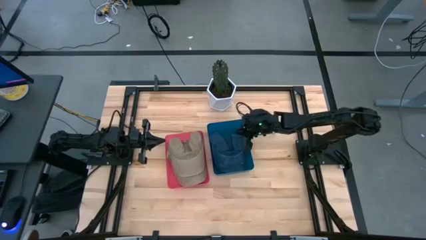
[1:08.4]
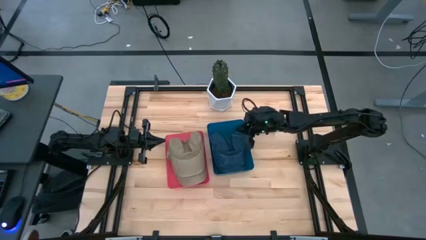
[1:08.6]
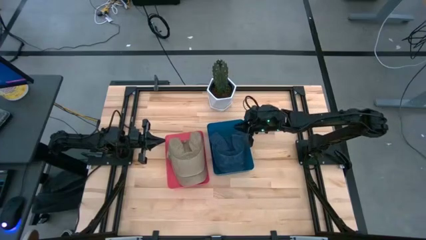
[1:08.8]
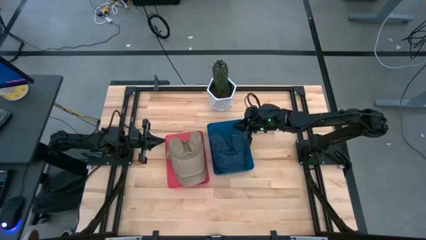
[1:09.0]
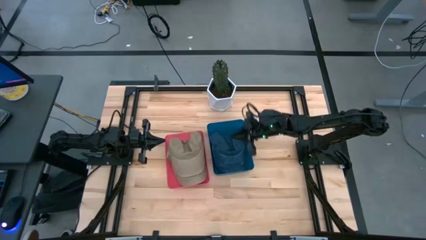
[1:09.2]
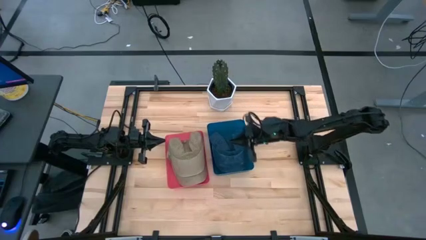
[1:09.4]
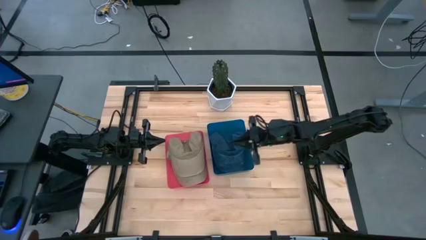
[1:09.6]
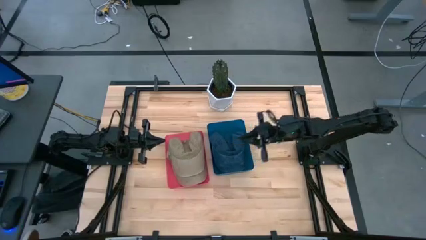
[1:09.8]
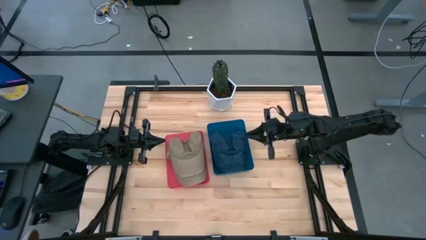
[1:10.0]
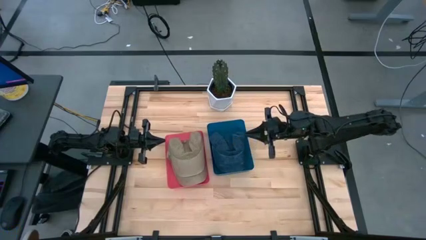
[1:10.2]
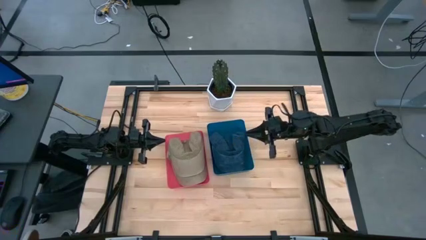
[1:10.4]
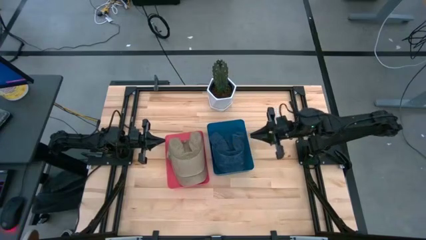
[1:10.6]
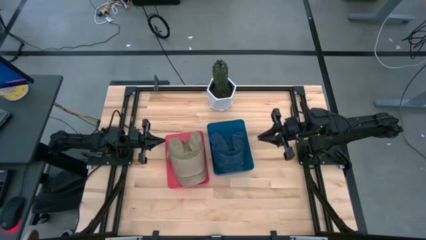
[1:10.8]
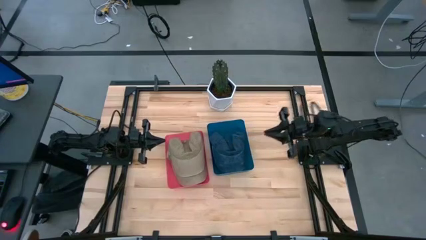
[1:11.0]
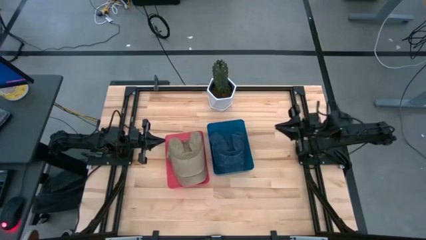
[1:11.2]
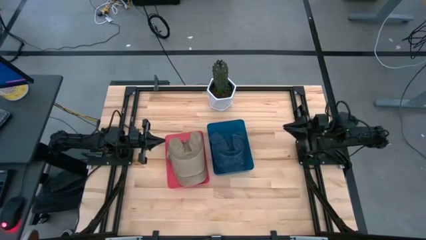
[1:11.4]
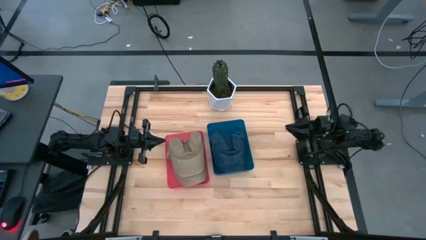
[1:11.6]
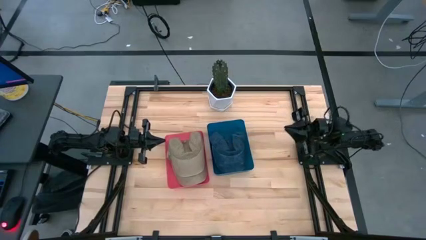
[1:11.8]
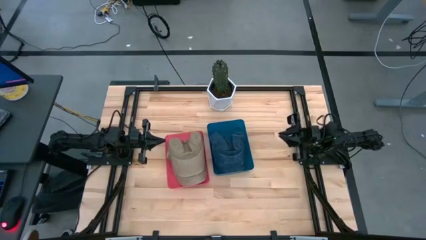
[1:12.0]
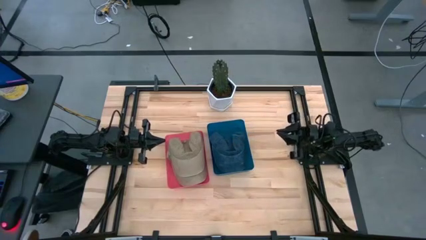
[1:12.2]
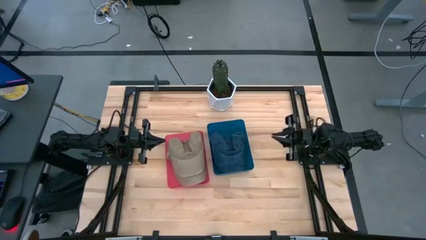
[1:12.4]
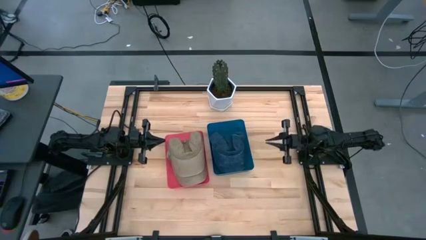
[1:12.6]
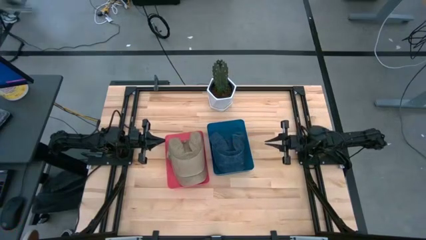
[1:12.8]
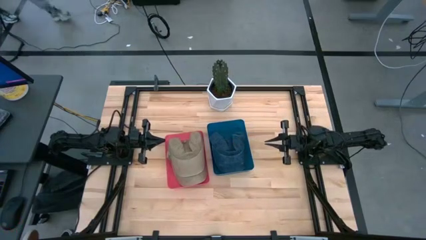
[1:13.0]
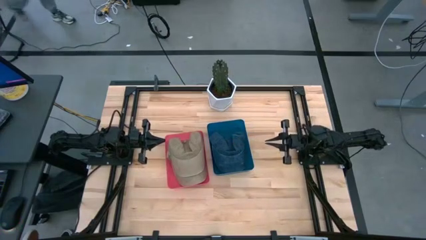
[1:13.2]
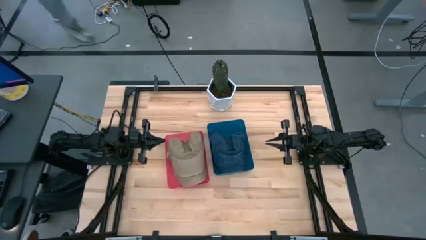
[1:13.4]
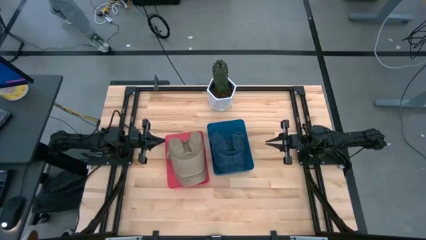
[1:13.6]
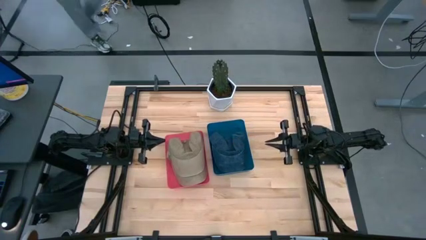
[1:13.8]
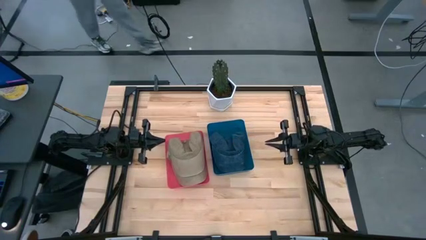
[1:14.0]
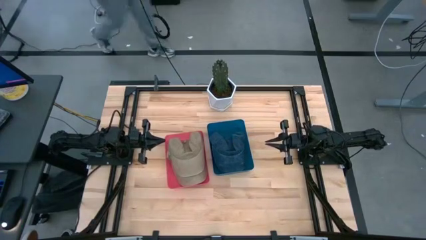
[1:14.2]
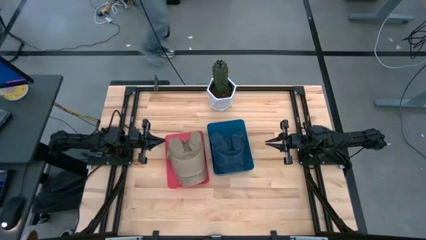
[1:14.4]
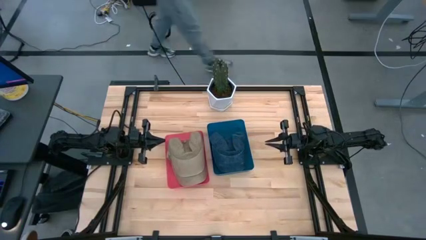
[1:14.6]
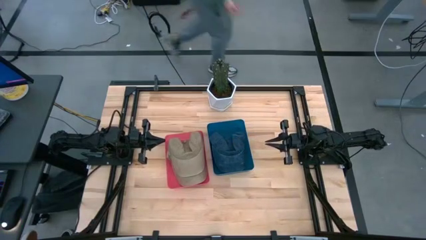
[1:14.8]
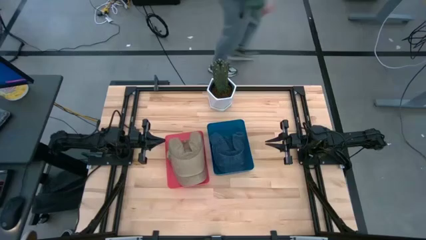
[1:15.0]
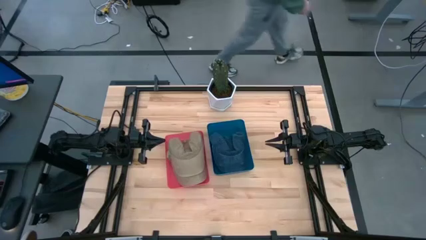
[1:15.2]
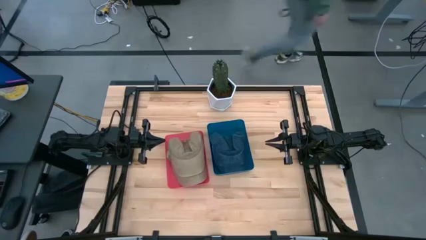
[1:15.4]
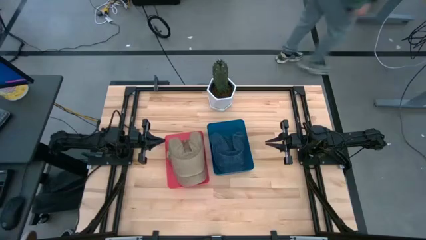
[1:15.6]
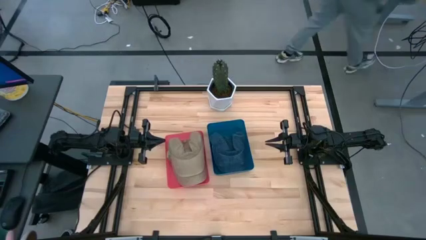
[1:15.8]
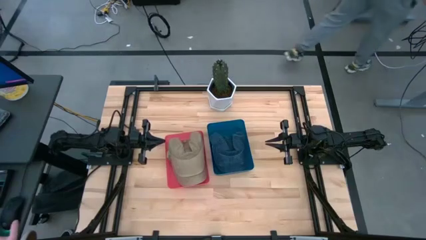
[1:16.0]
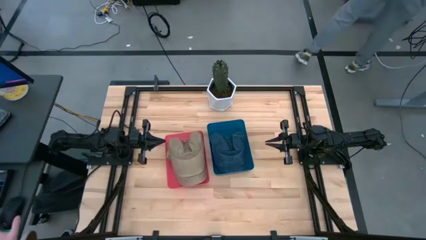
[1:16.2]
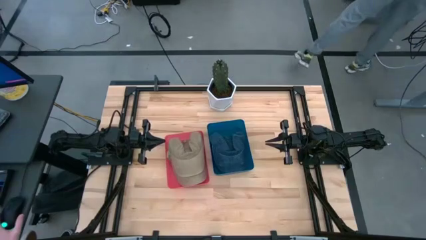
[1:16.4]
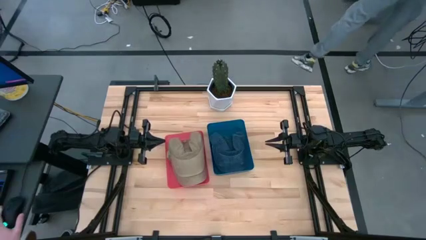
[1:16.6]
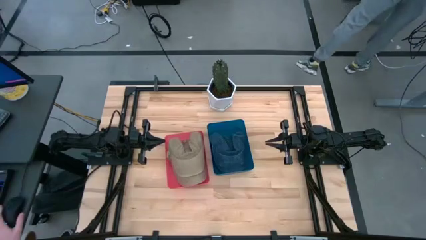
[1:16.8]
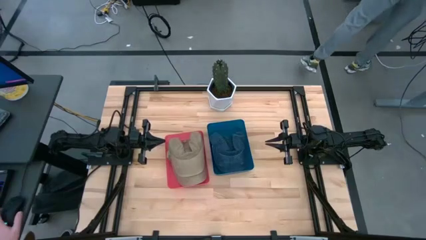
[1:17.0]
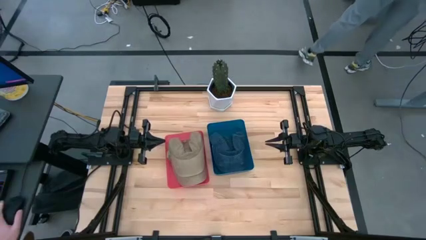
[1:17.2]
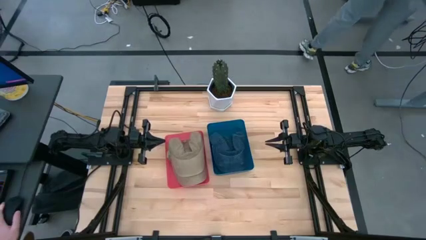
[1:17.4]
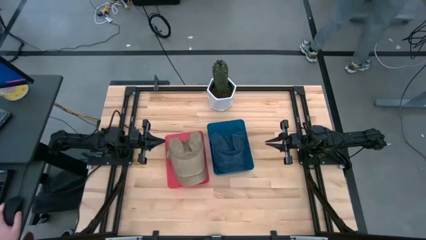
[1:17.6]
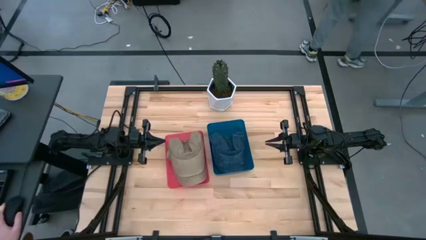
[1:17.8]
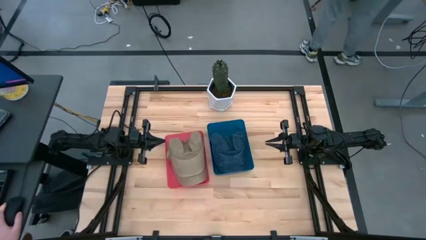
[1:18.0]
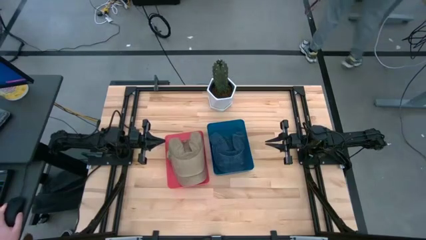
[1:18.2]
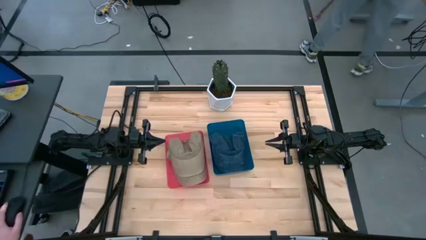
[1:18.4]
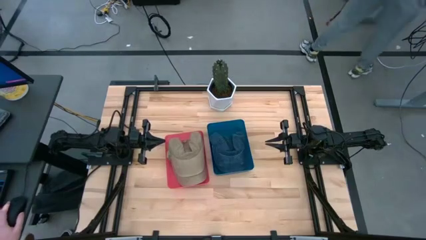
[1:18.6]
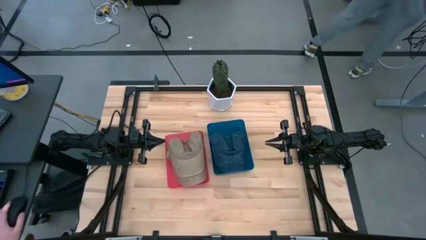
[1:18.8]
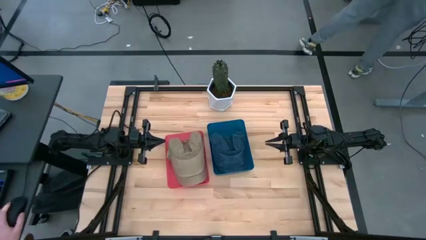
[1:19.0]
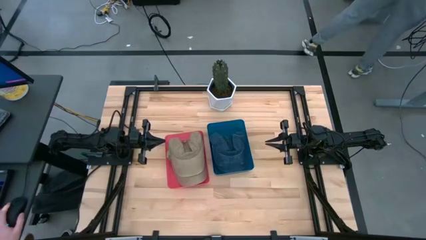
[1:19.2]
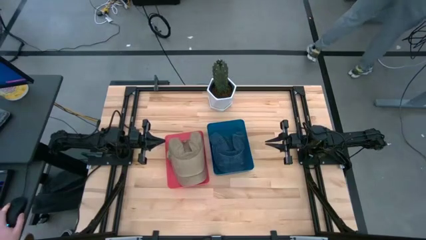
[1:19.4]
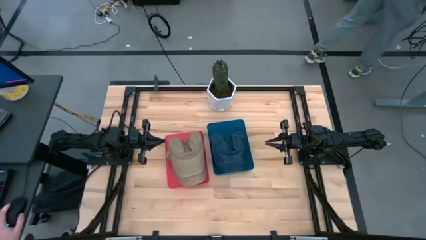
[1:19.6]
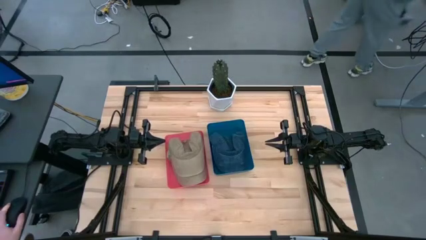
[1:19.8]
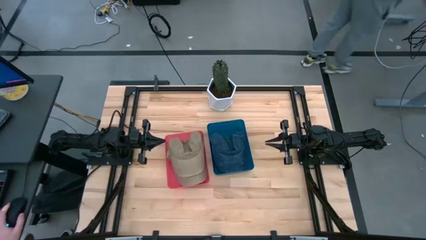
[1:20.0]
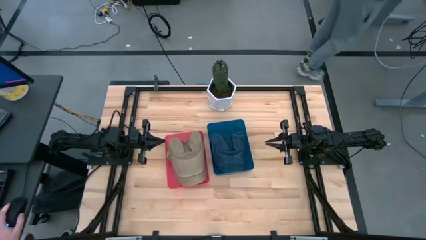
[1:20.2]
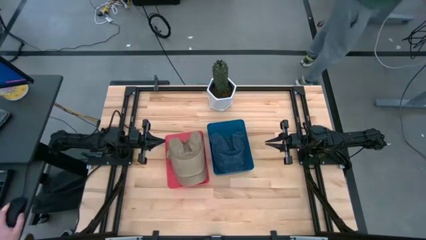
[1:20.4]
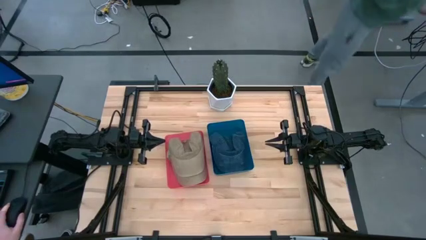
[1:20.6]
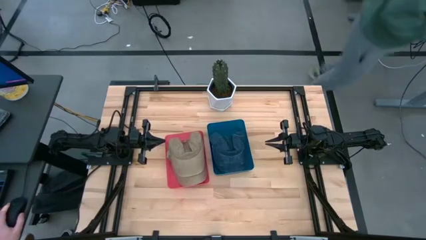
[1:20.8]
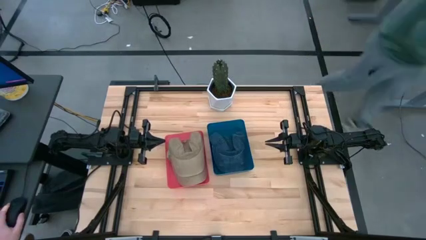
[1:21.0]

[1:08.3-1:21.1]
Task: Pick & Place hat
Return to Home Position

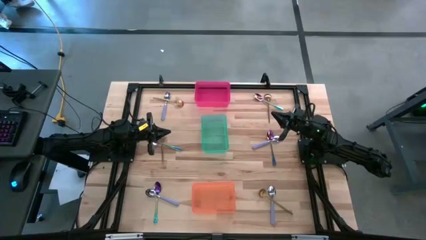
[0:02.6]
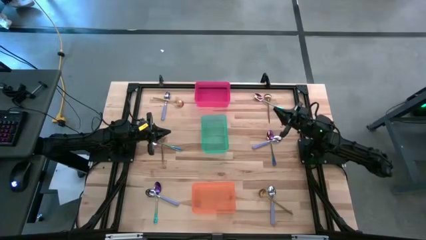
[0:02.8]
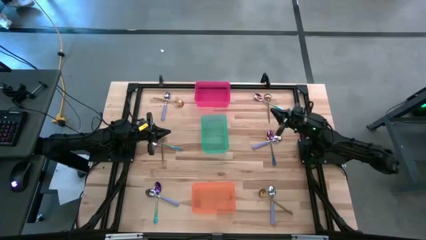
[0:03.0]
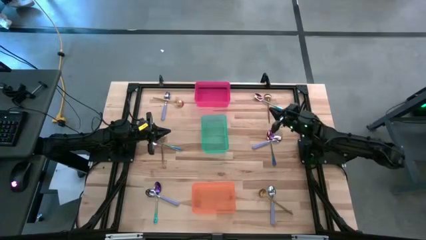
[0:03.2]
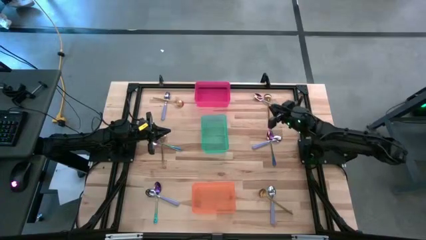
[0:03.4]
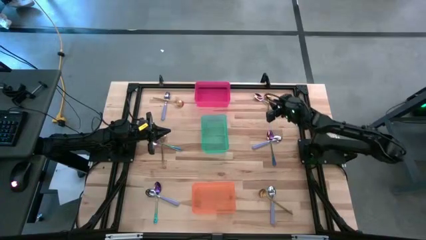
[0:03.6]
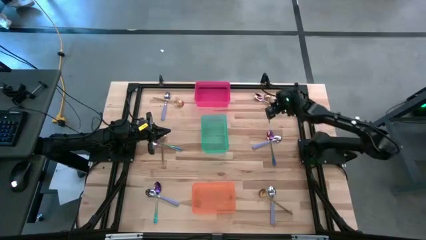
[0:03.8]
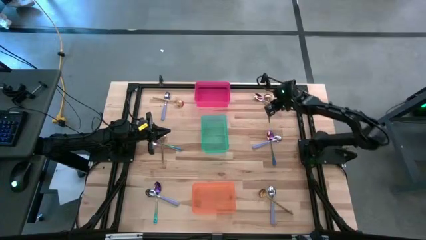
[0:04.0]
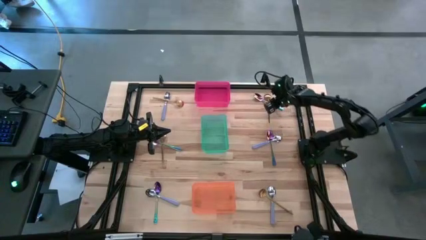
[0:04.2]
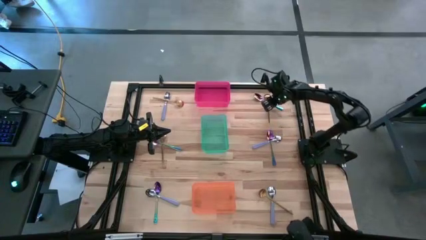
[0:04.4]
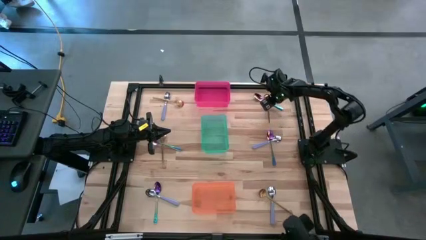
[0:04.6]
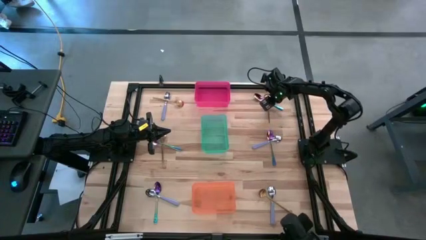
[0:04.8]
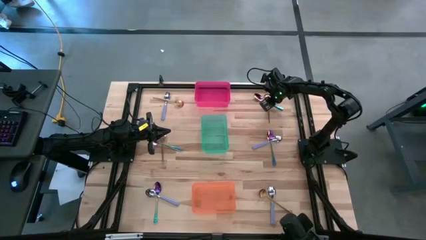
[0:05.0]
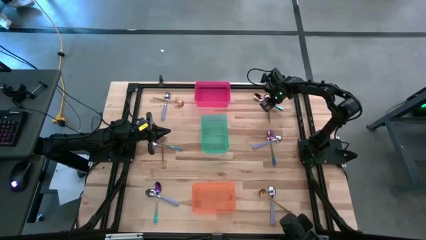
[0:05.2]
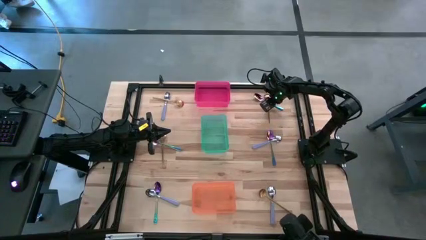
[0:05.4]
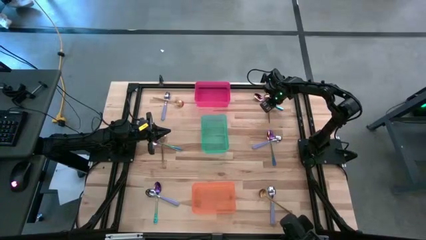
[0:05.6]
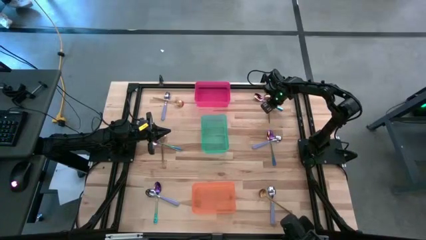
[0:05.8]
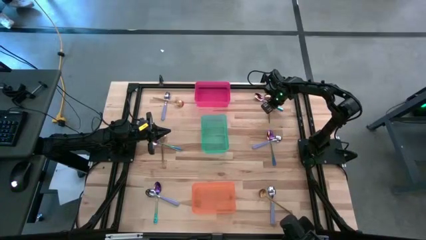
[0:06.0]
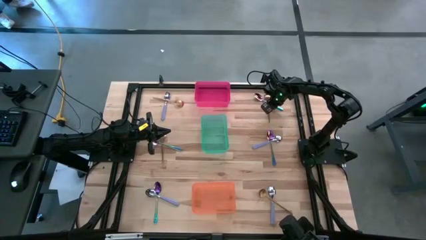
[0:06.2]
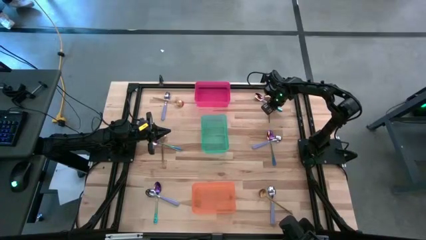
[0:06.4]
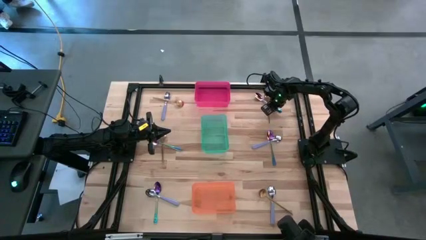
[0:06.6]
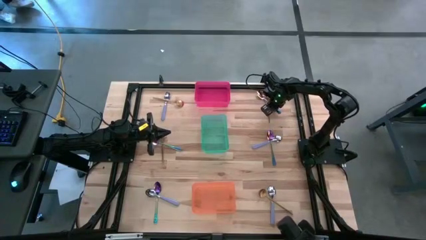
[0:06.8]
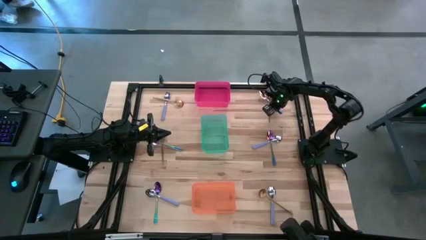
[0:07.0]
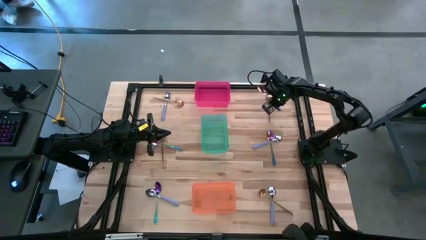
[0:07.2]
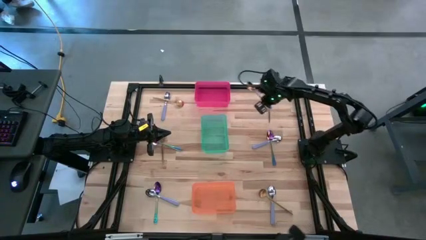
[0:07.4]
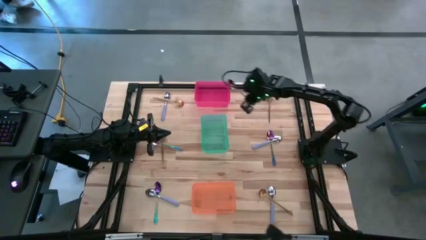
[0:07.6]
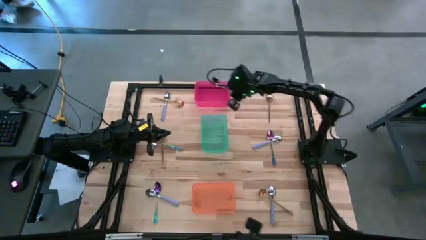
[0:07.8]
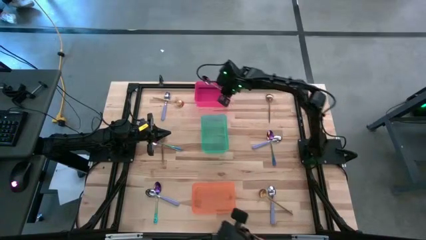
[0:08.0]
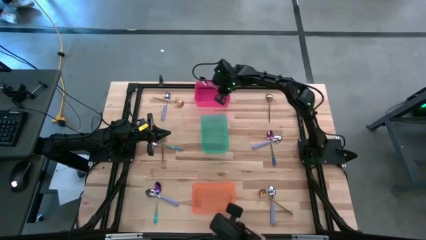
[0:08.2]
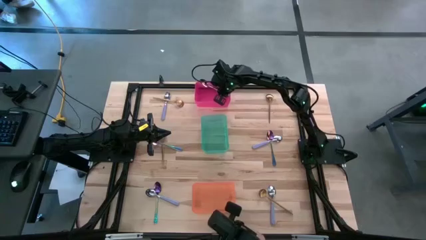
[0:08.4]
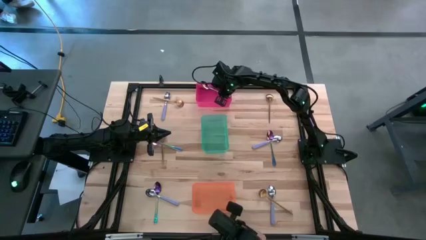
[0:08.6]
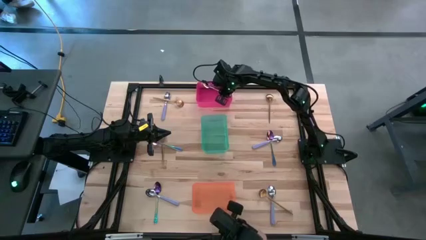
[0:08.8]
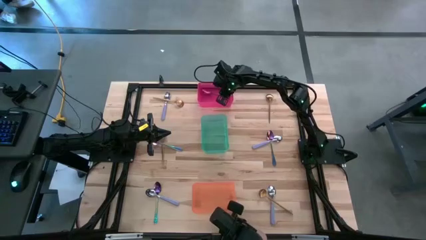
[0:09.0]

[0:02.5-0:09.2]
Task: Sort silverware by color (type)
Put the blue spoon into the red bin
